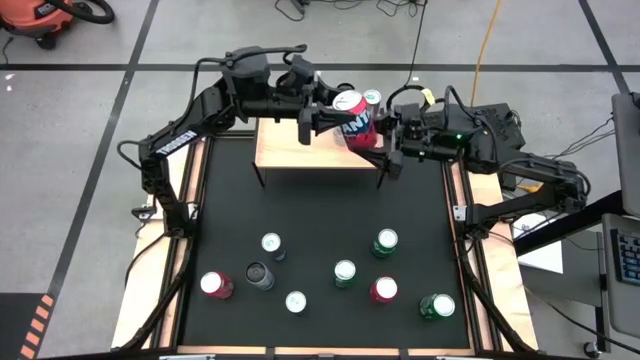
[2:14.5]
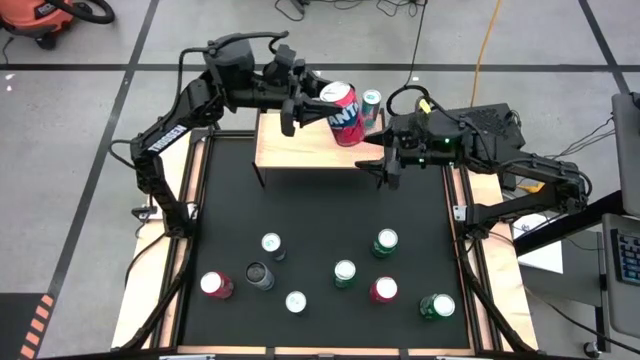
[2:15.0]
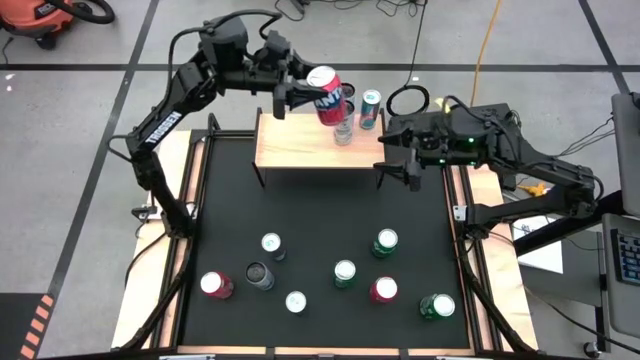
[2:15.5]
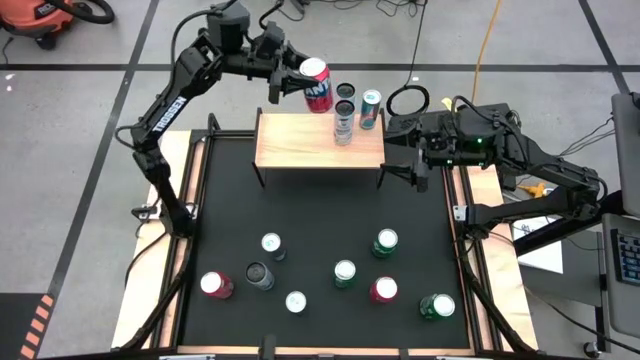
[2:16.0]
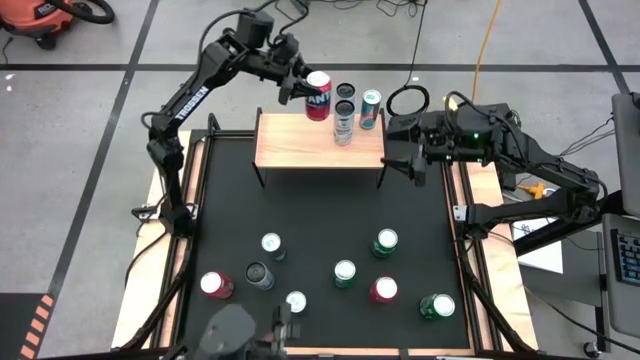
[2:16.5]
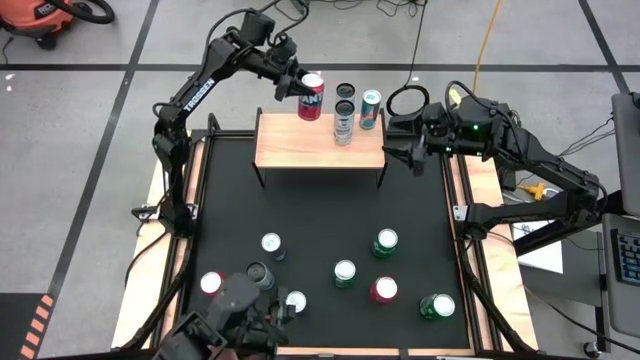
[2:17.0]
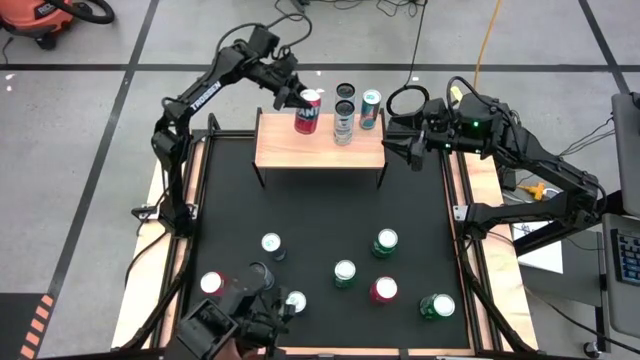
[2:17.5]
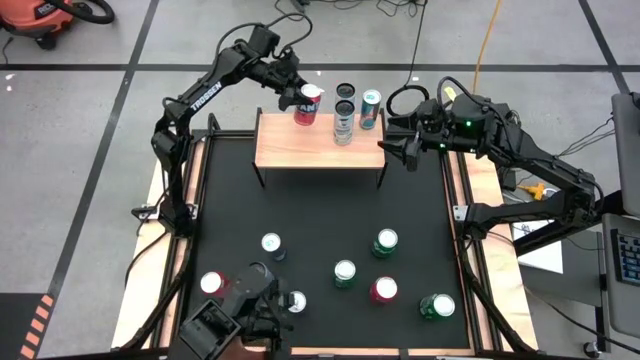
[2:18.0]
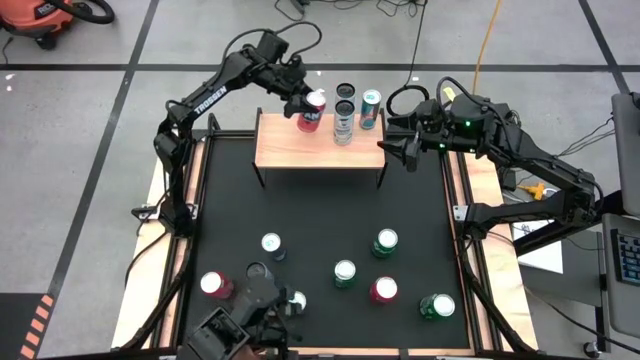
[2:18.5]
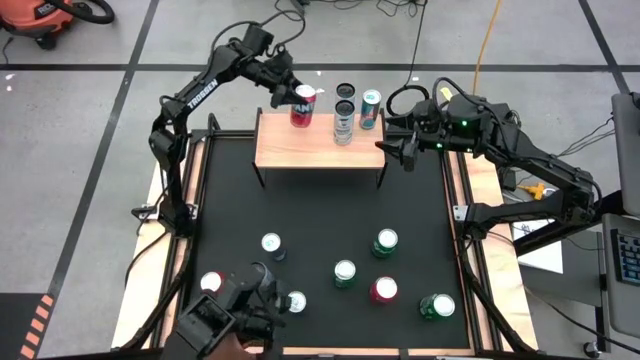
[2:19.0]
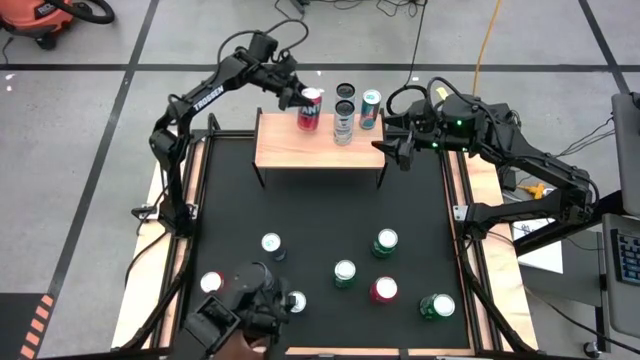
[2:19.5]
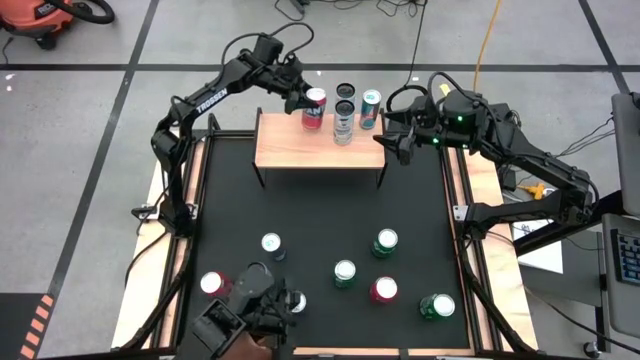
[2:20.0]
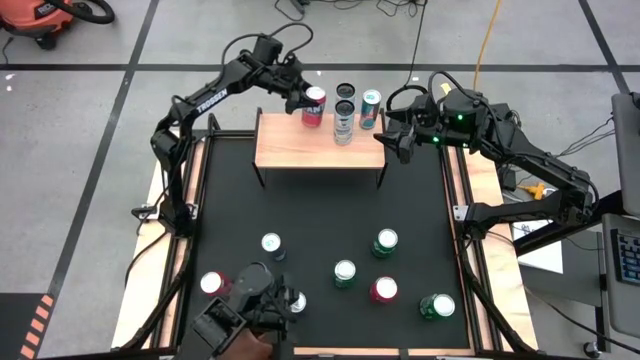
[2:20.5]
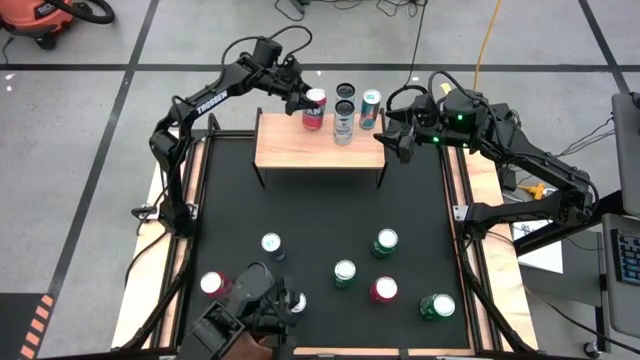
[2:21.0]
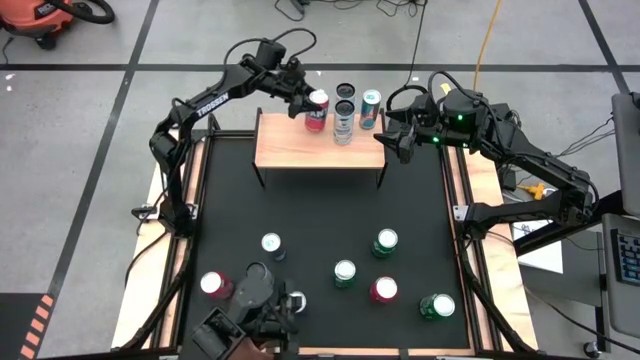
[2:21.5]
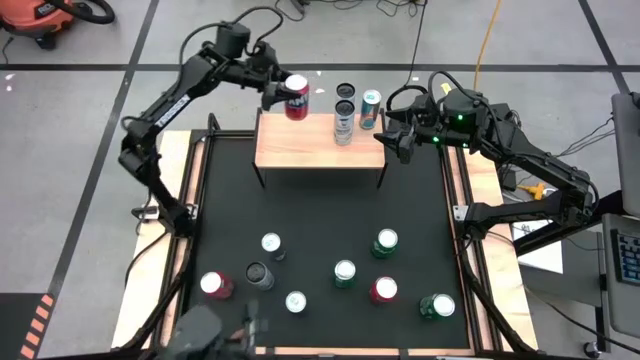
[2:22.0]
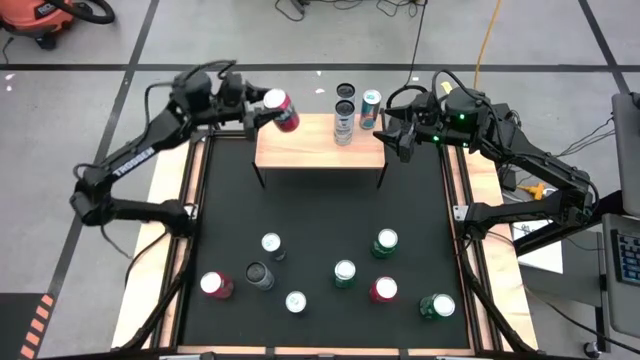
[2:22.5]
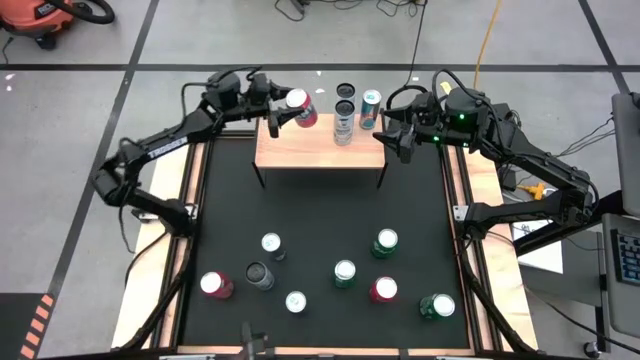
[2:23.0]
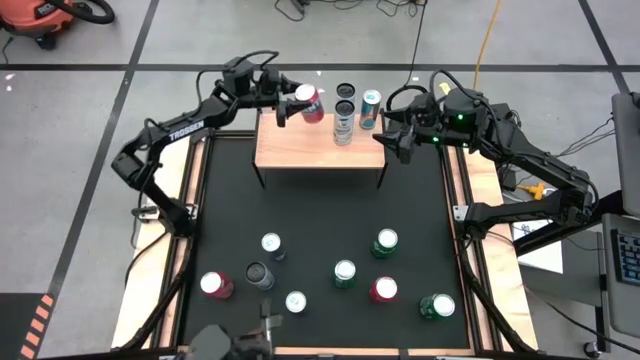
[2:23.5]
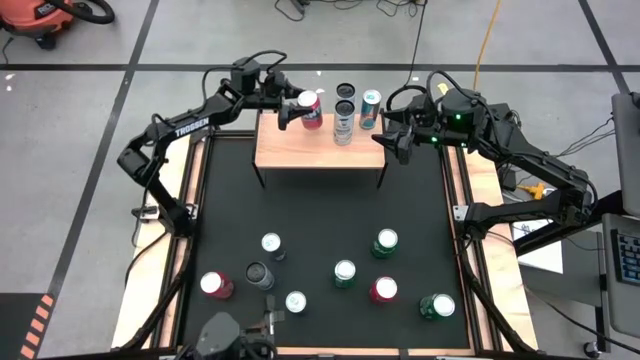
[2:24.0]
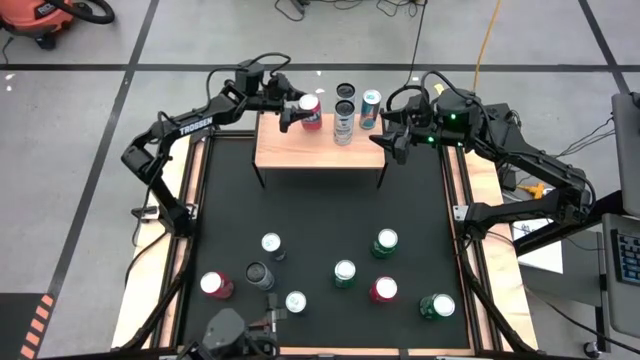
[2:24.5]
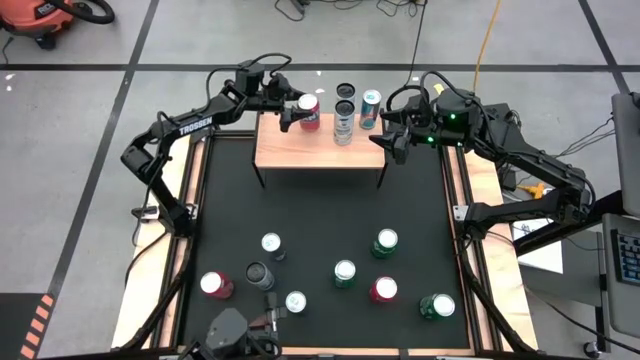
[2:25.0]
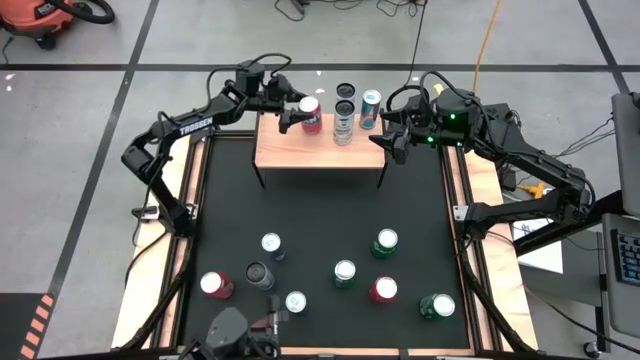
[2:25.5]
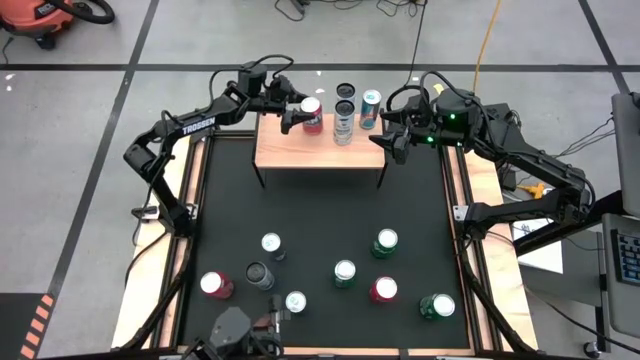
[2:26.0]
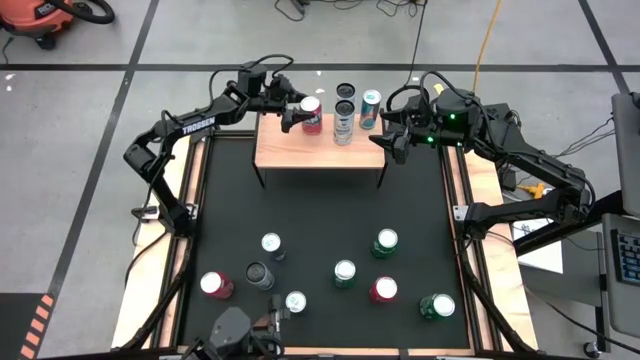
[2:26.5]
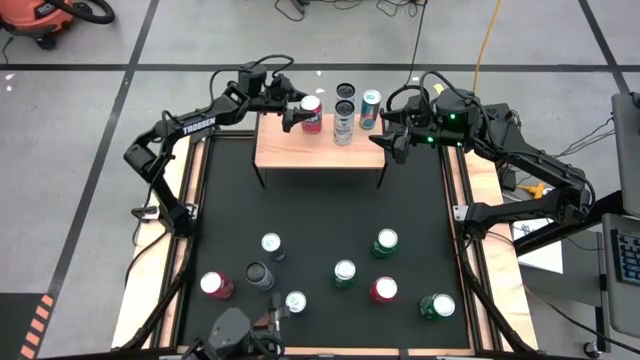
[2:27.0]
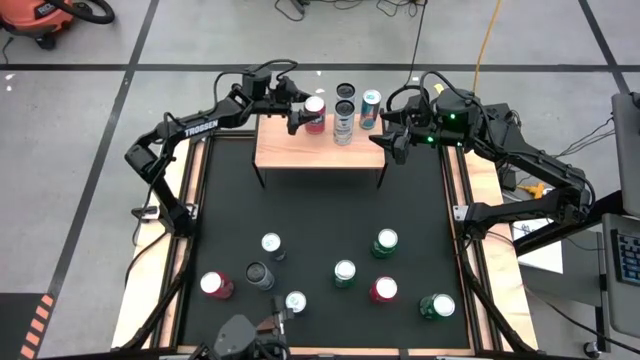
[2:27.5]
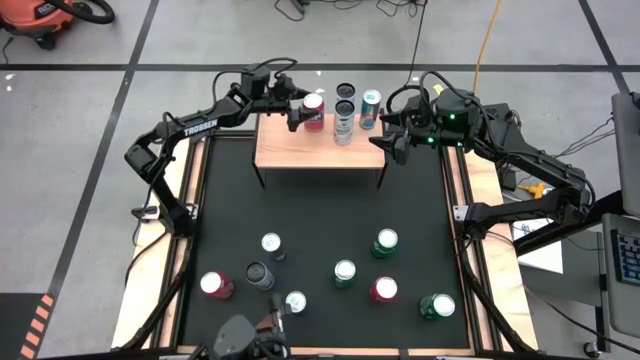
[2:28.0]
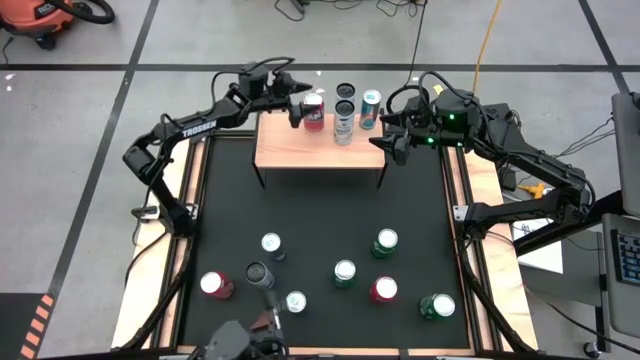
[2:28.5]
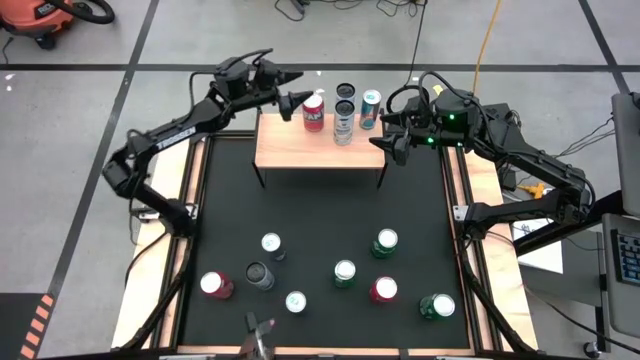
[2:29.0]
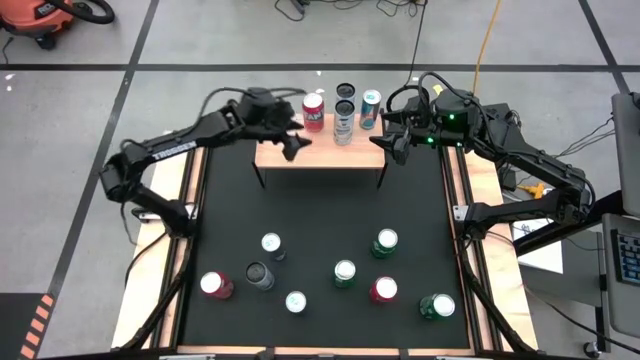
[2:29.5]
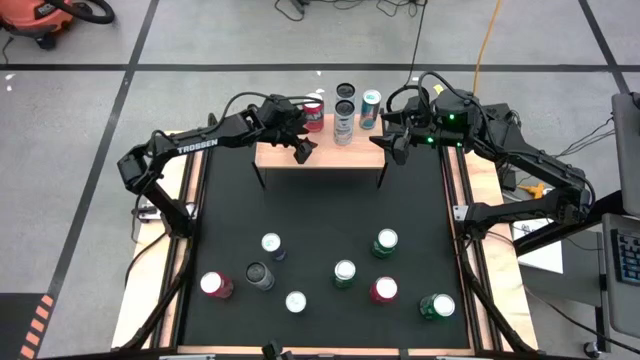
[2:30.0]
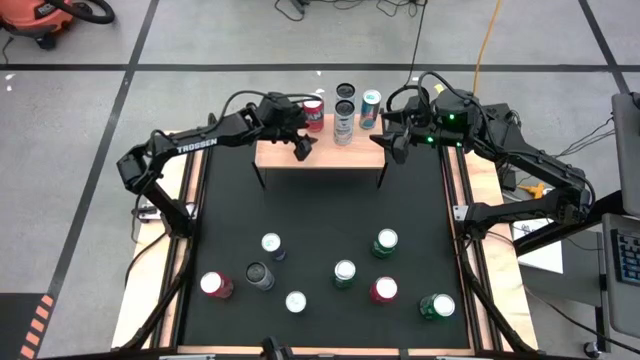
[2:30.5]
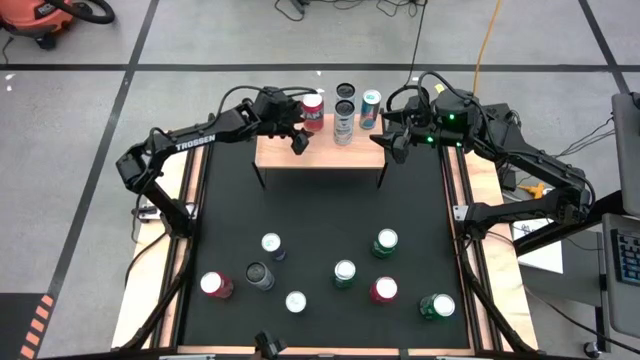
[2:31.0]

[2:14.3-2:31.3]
Task: Place canned beverage on shelf
Put the top center orange soda can on the shelf

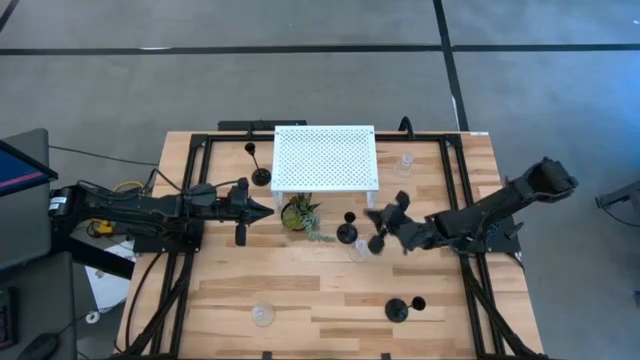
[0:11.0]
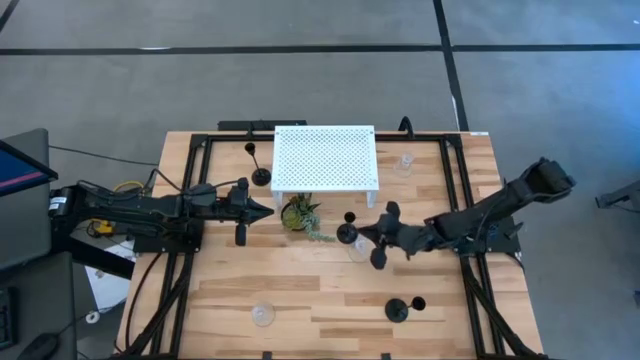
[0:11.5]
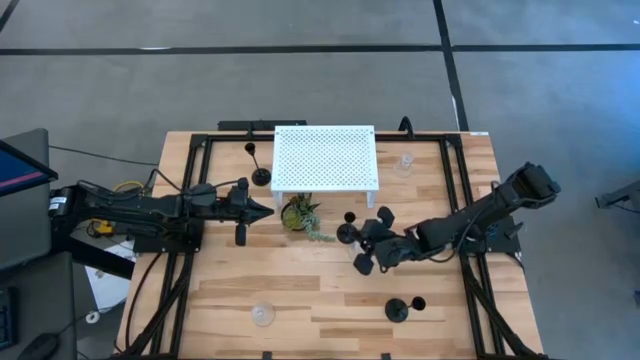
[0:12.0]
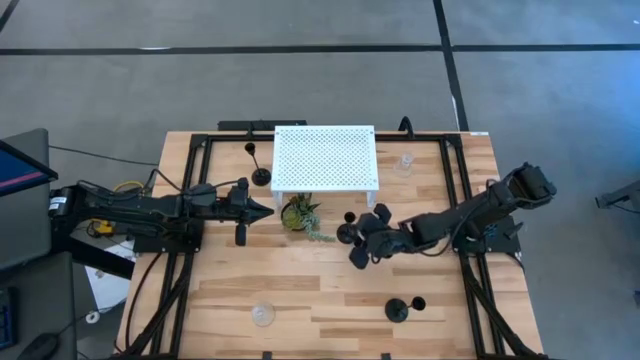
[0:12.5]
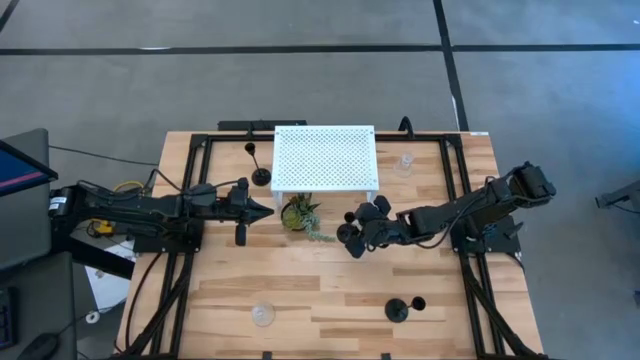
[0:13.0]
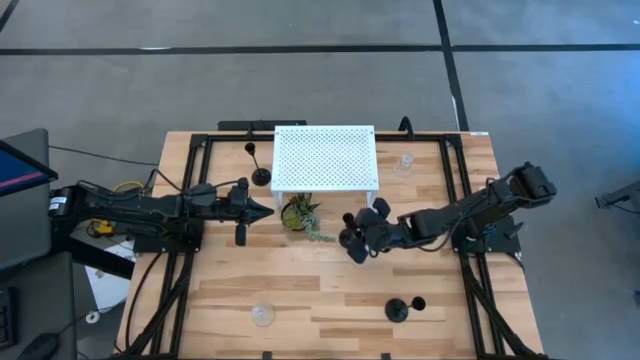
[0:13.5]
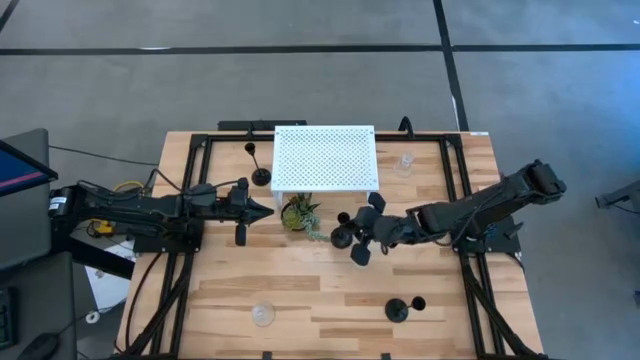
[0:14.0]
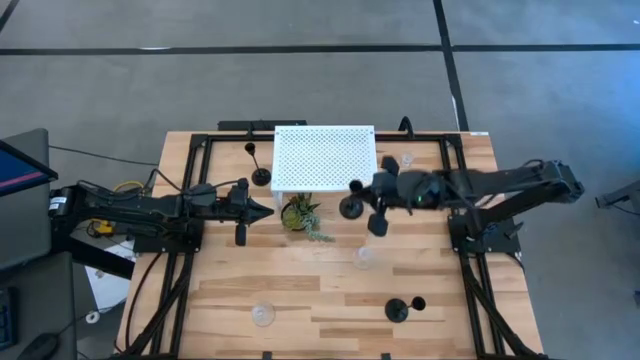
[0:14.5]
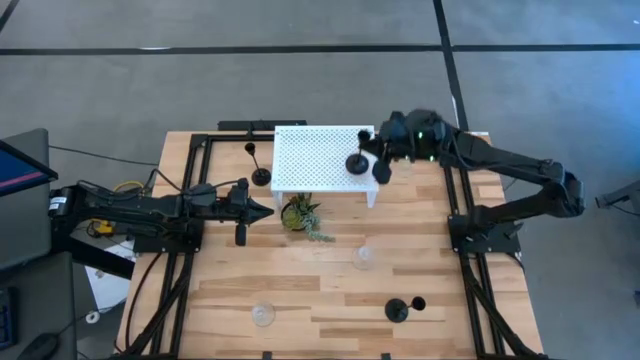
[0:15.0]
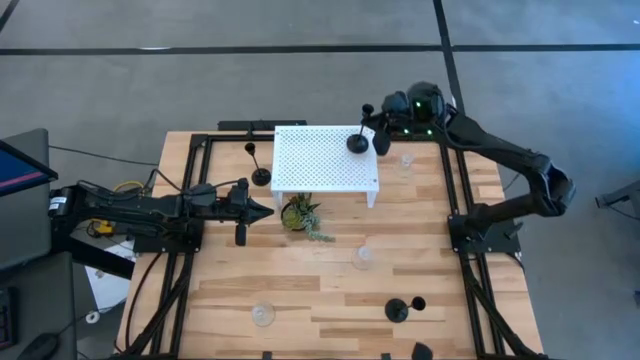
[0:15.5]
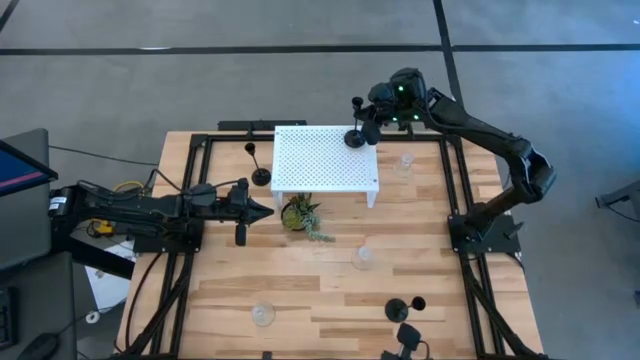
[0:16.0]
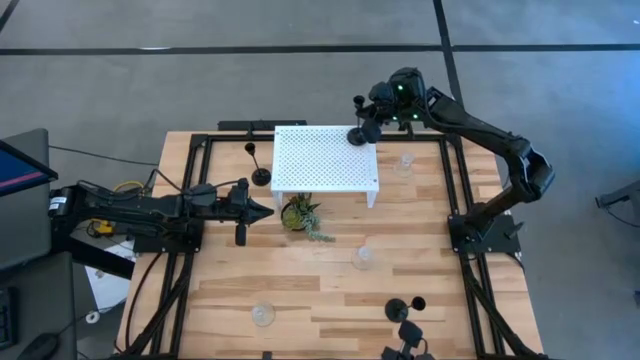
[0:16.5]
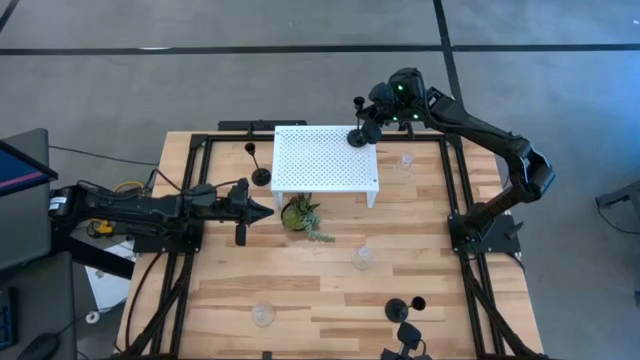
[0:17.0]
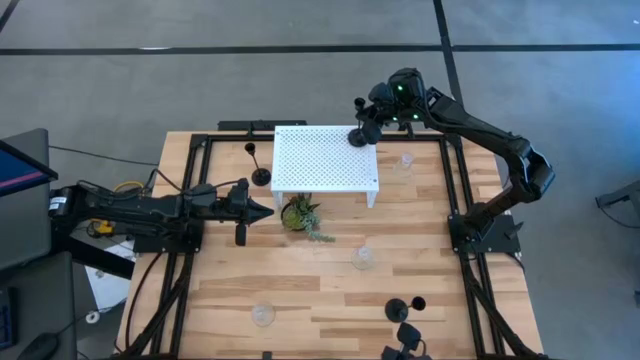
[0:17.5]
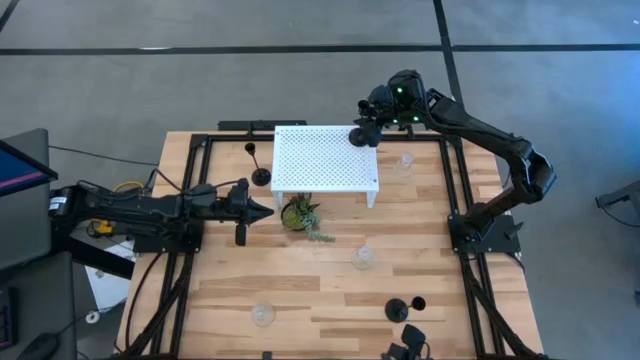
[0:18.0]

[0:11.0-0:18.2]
Task: Pick & Place candle stick holders
Put the middle black candle holder on the shelf
